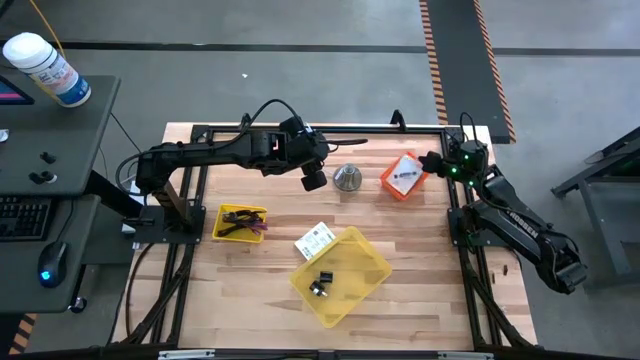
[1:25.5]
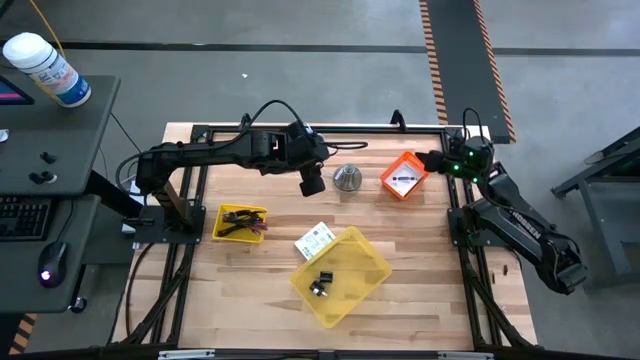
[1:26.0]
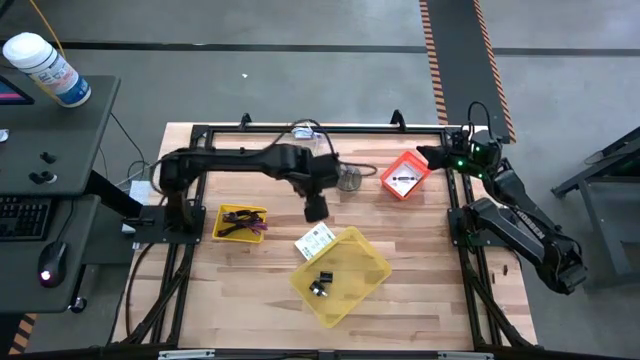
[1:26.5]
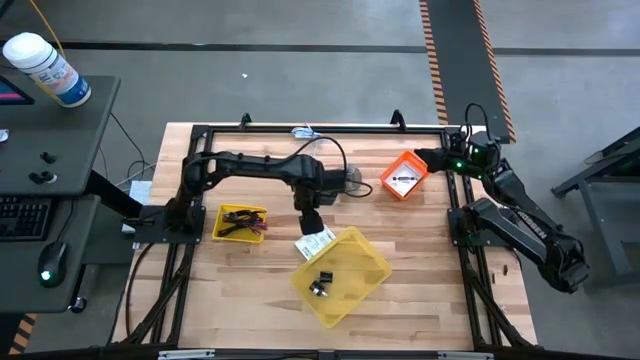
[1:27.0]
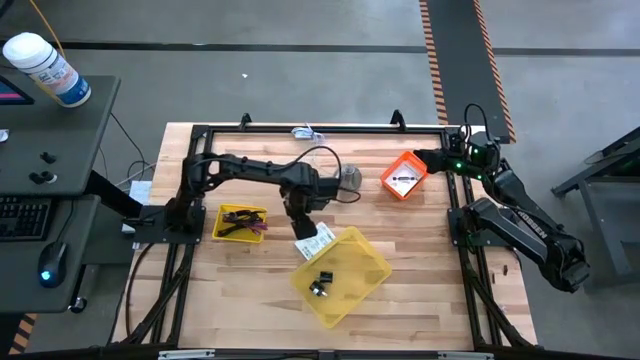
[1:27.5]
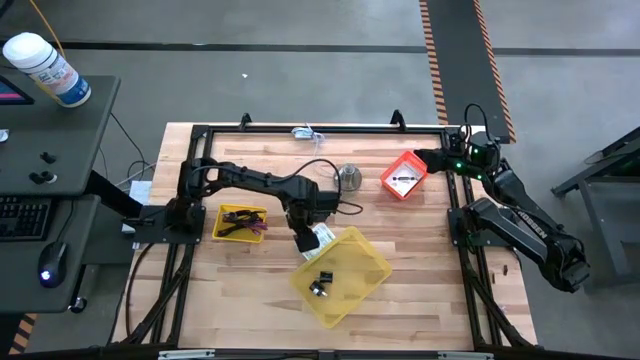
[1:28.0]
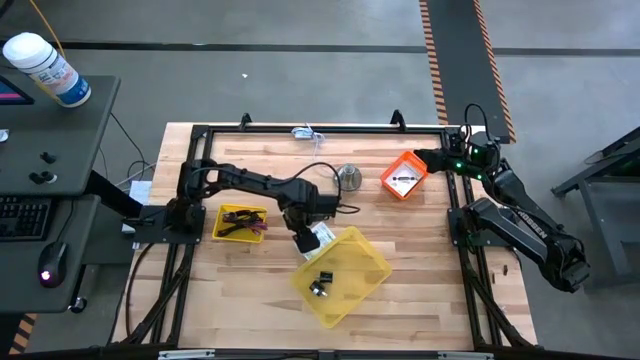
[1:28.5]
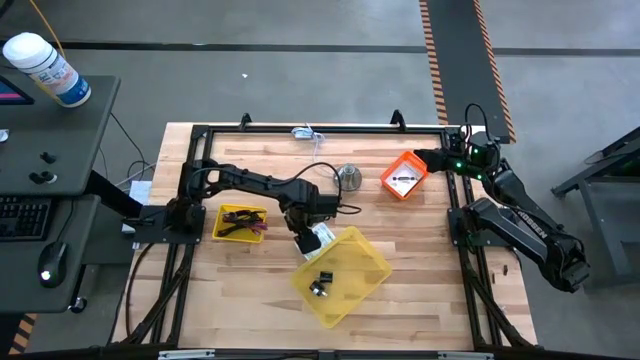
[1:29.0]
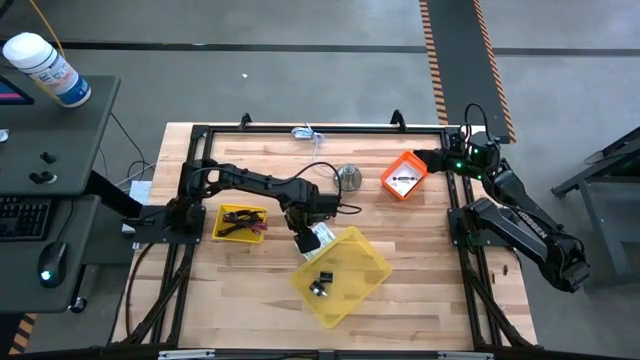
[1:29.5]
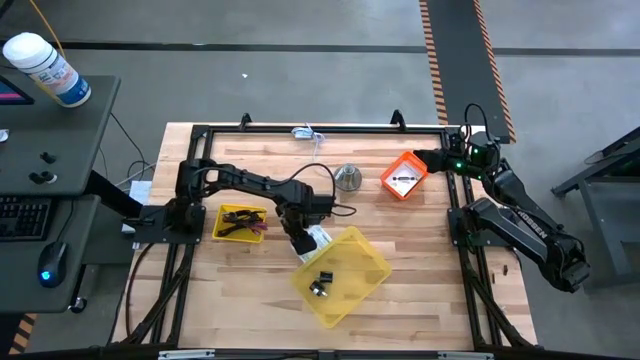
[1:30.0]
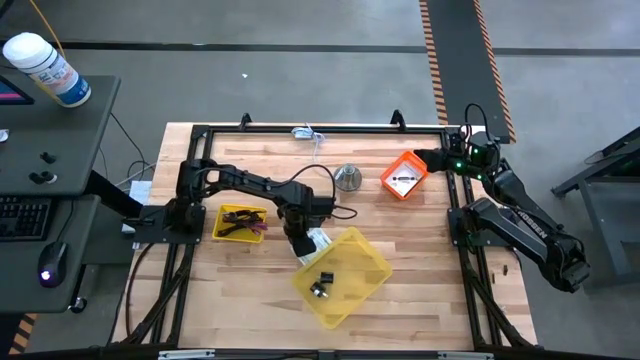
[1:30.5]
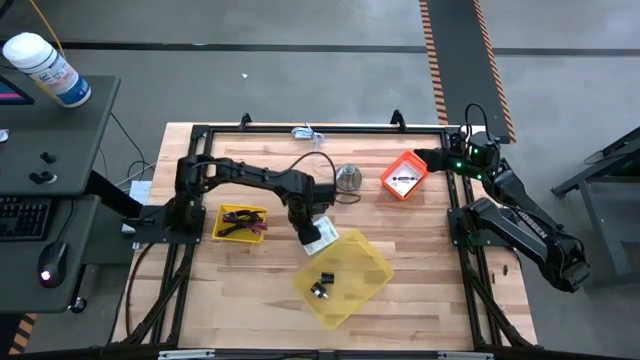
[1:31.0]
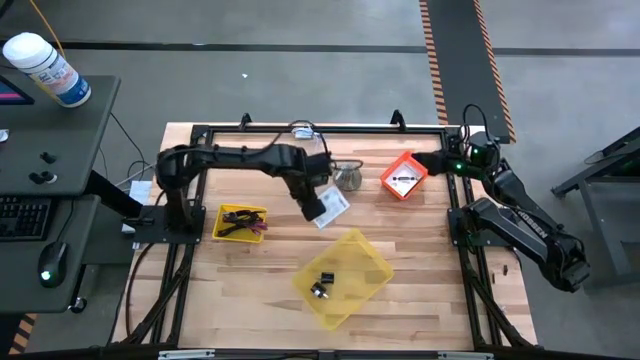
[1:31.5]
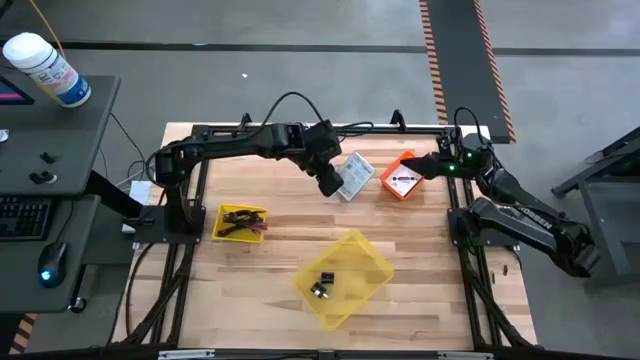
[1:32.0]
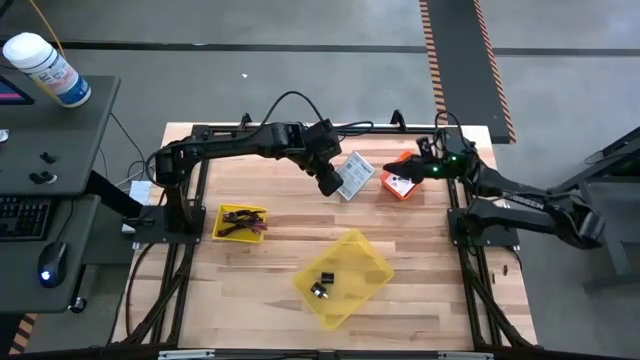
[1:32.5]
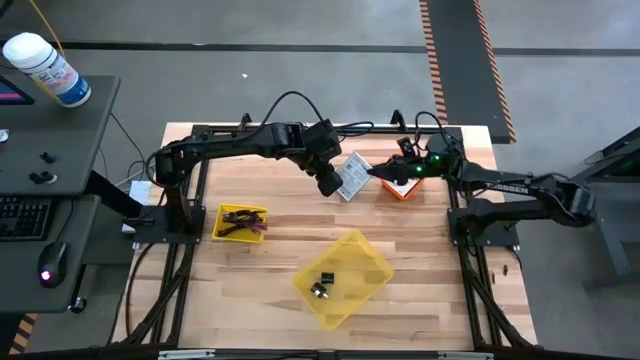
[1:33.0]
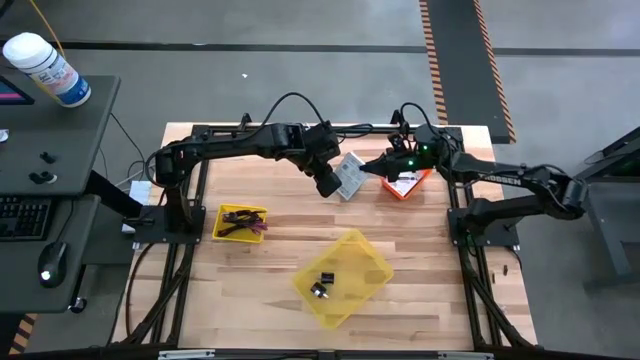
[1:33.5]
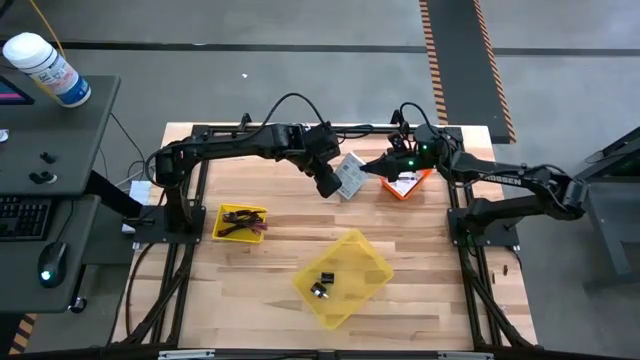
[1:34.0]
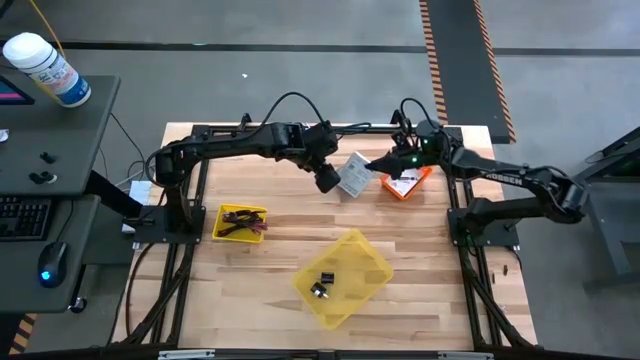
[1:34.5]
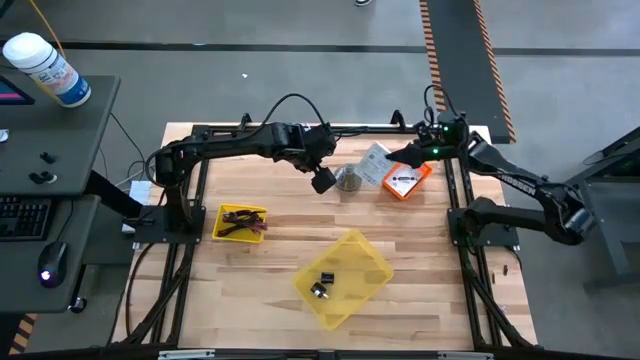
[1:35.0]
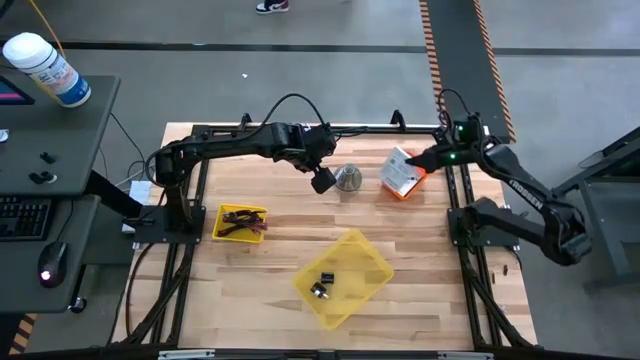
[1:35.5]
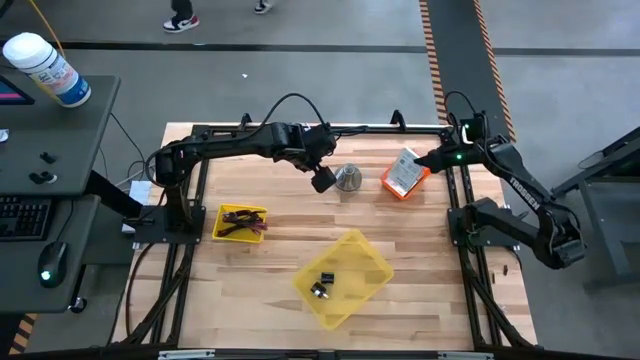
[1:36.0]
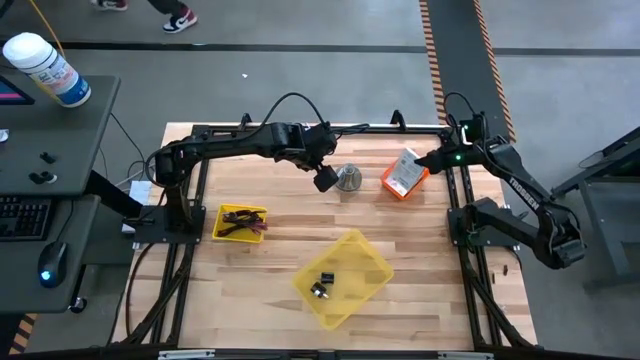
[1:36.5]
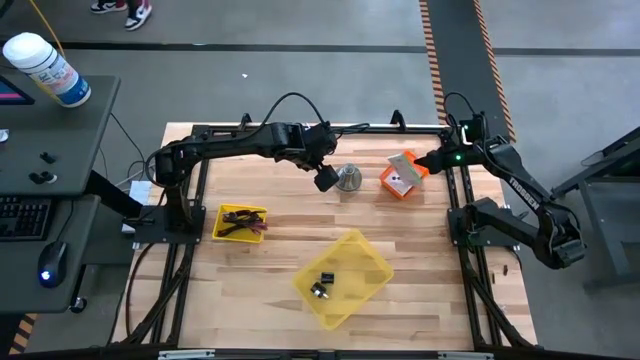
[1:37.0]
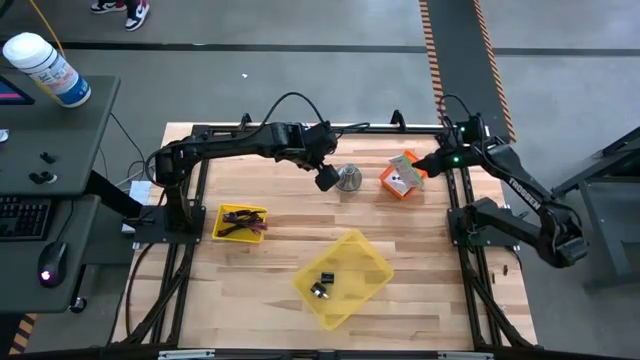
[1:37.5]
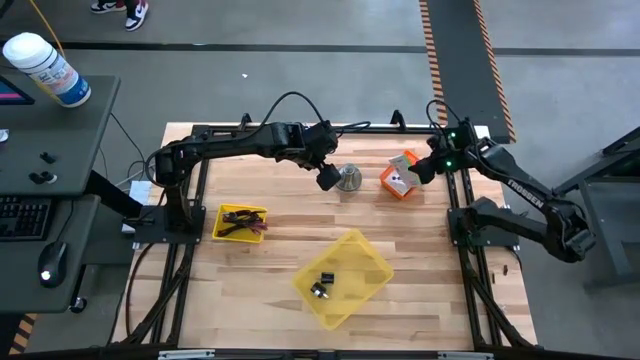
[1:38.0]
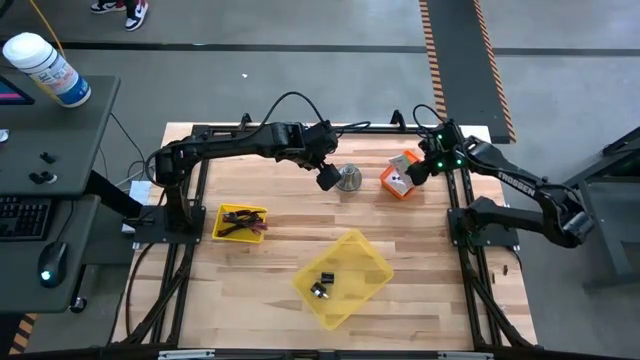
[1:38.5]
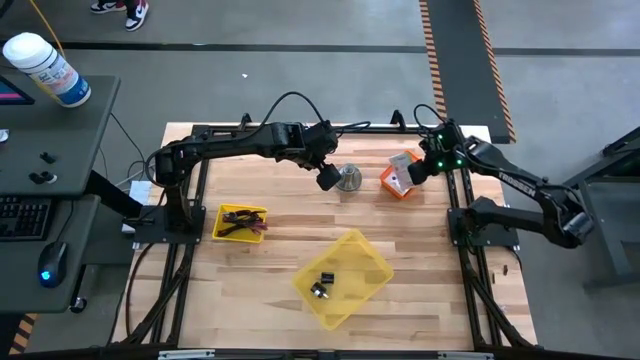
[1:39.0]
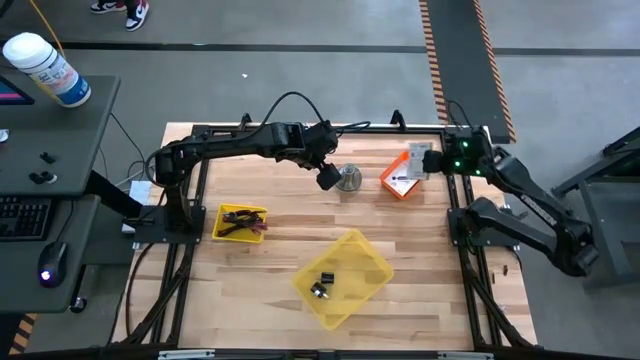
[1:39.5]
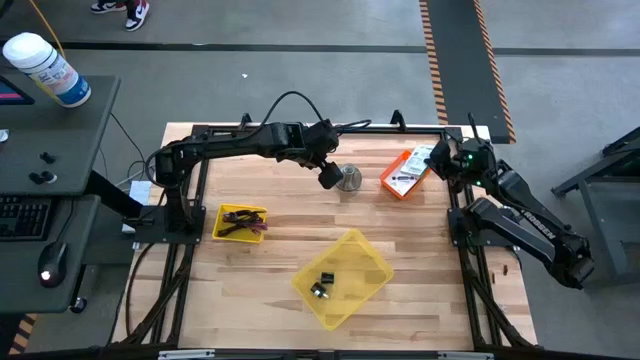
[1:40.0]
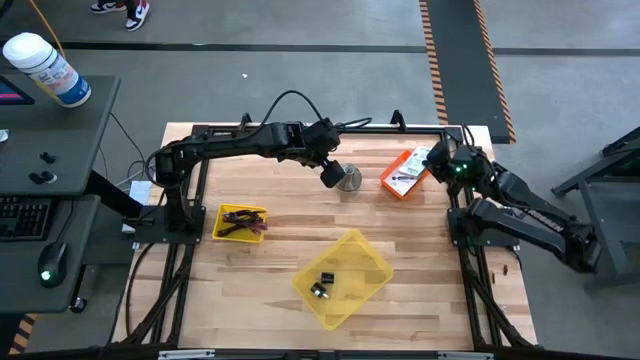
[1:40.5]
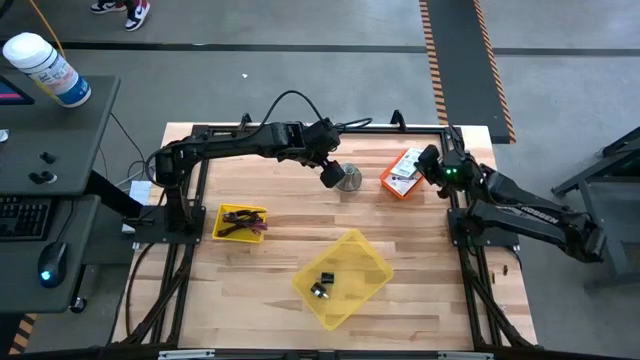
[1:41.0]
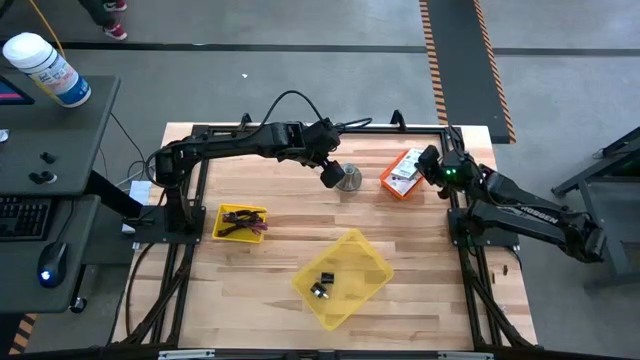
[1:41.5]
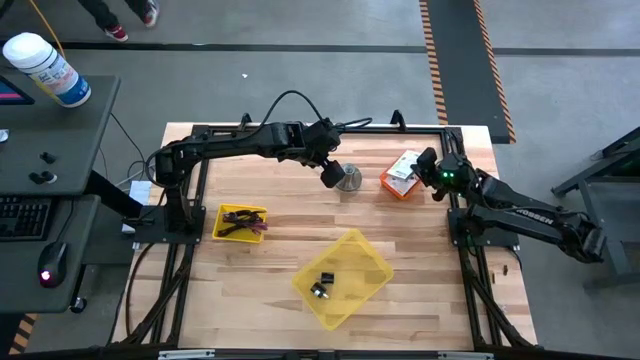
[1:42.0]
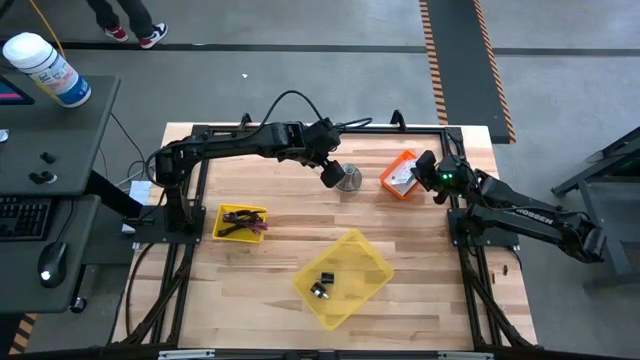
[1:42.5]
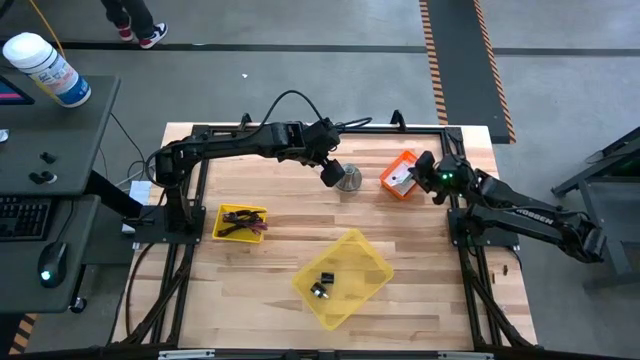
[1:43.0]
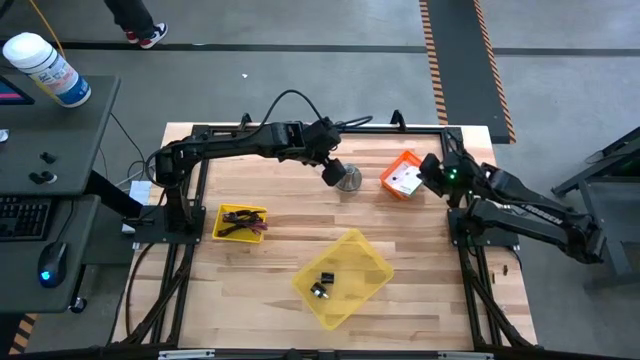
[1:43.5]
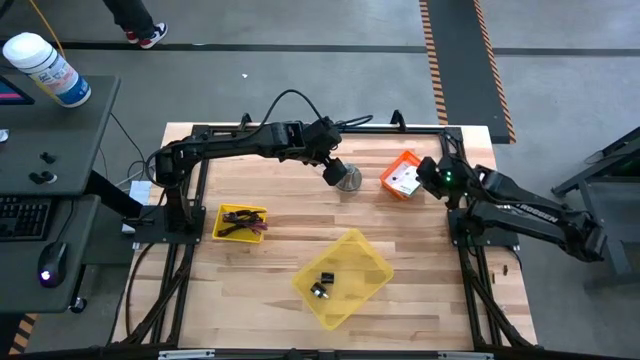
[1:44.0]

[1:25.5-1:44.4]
Task: Pick and place items into bin
Put the white card reader box into the orange bin
